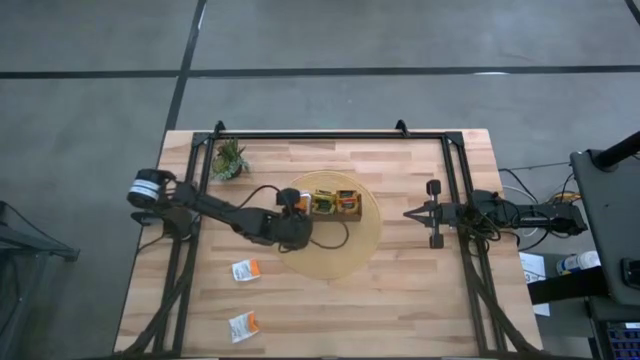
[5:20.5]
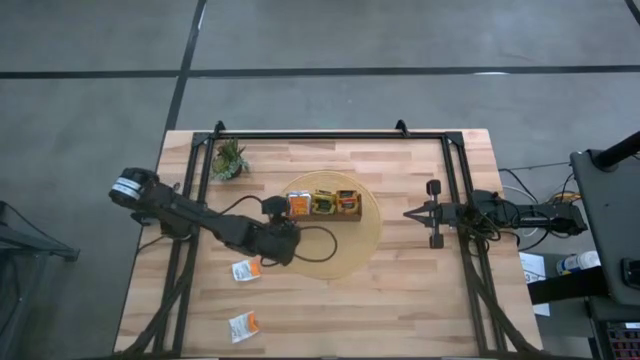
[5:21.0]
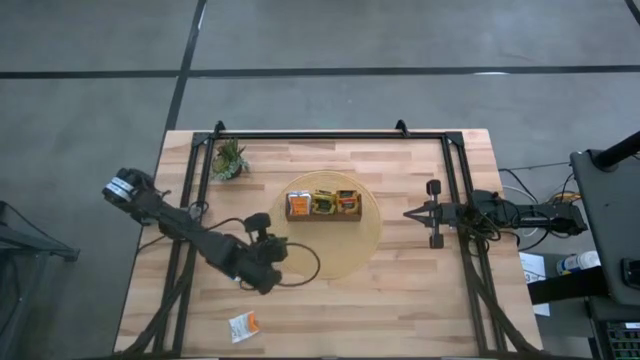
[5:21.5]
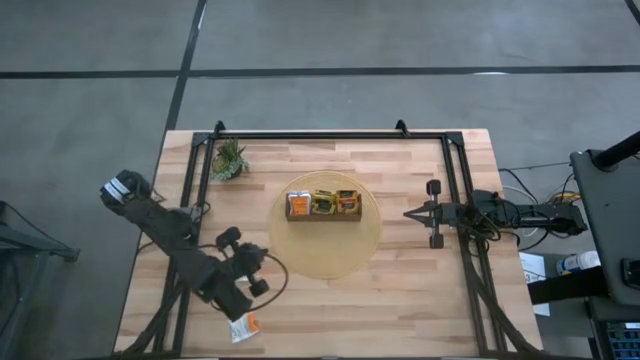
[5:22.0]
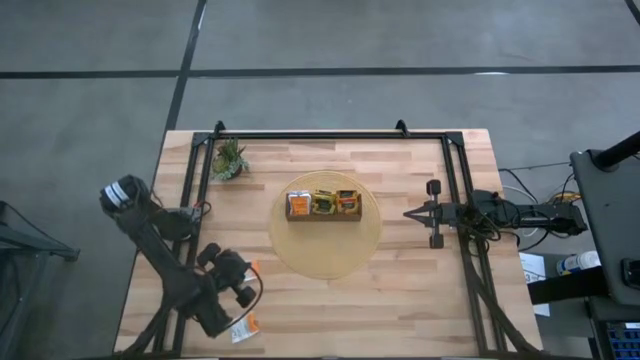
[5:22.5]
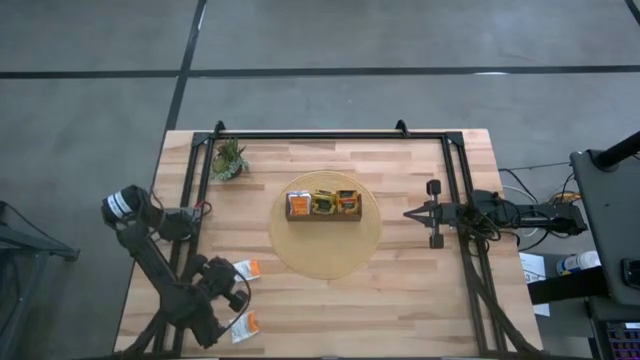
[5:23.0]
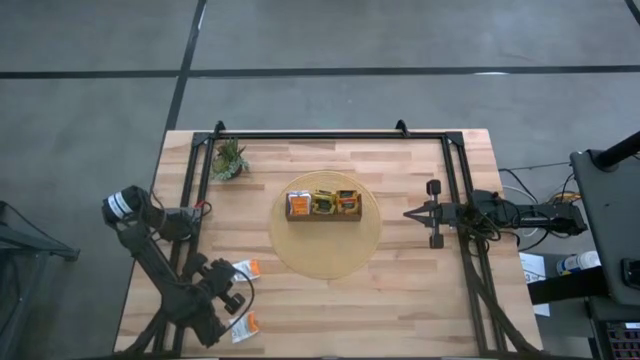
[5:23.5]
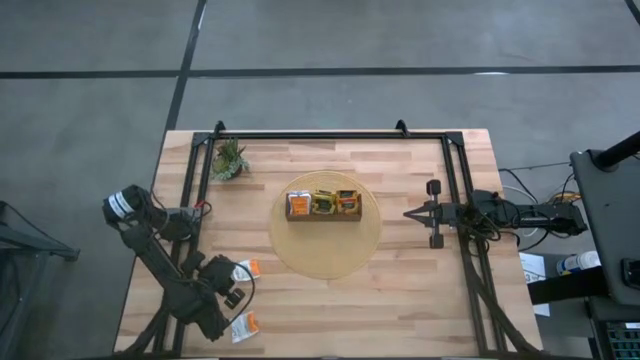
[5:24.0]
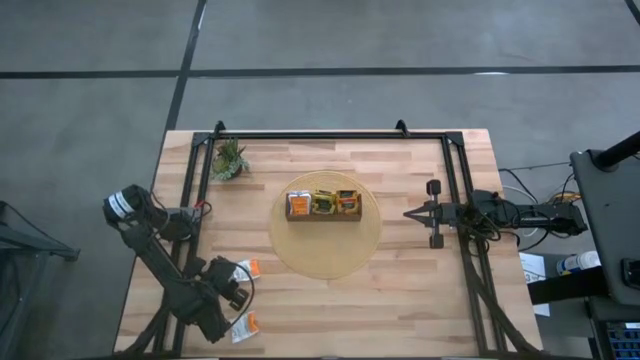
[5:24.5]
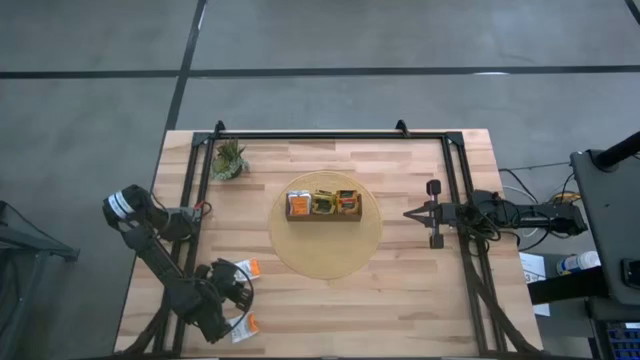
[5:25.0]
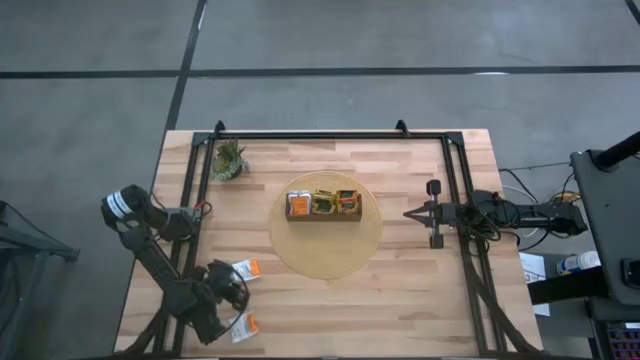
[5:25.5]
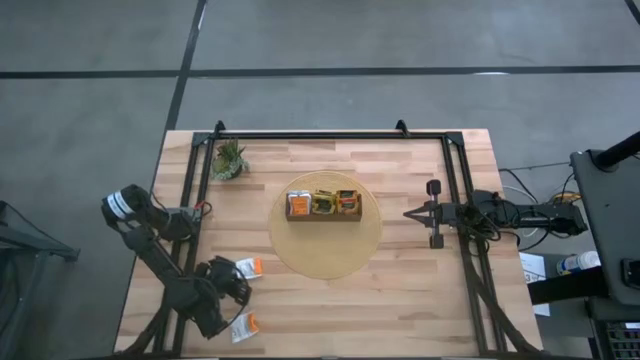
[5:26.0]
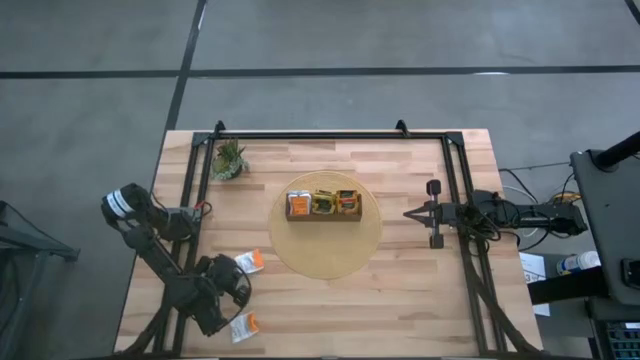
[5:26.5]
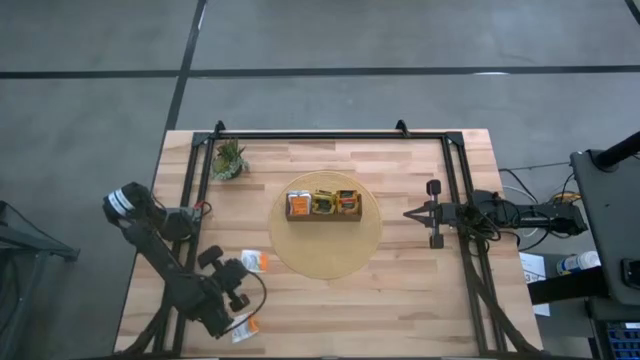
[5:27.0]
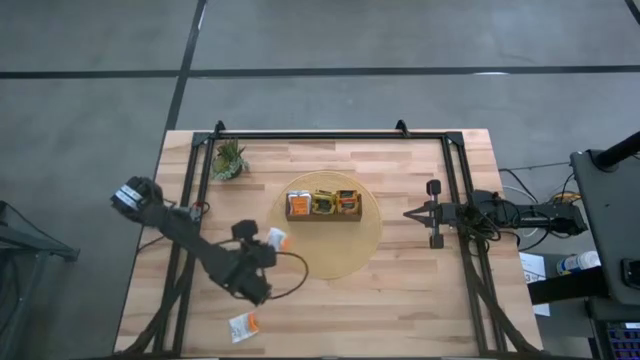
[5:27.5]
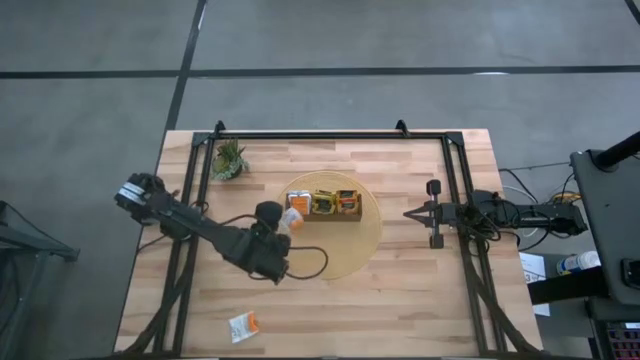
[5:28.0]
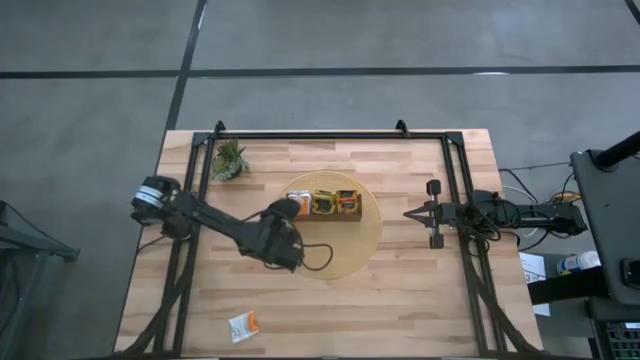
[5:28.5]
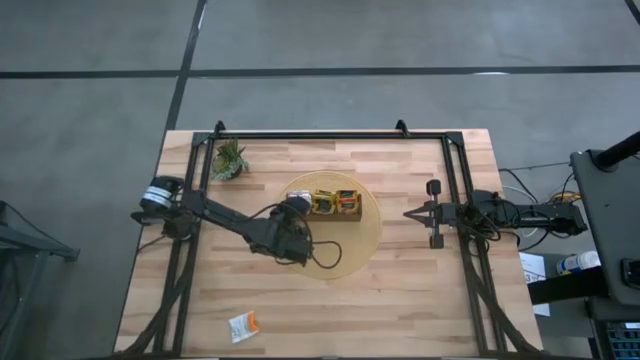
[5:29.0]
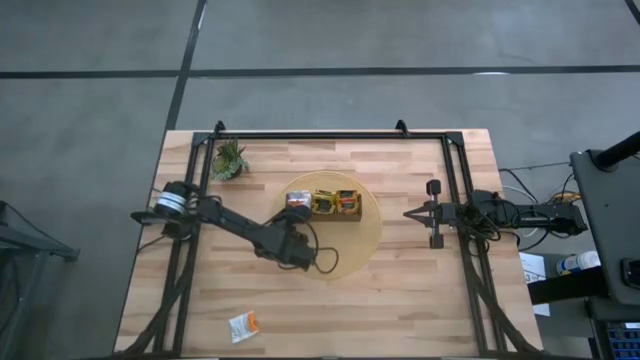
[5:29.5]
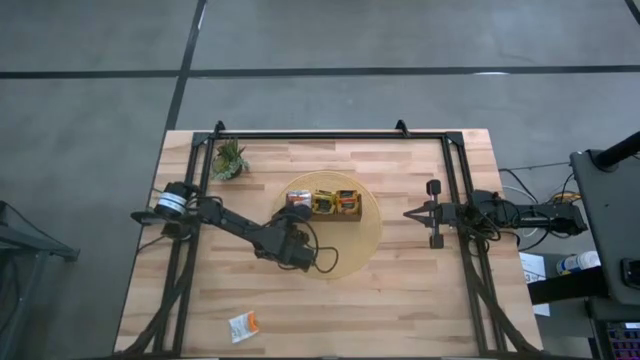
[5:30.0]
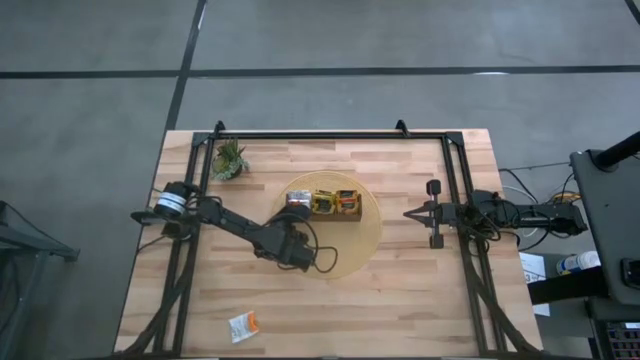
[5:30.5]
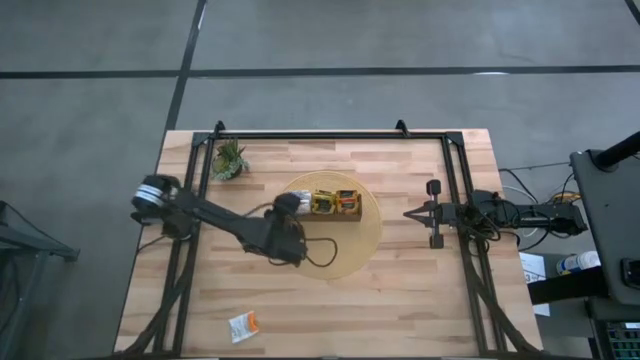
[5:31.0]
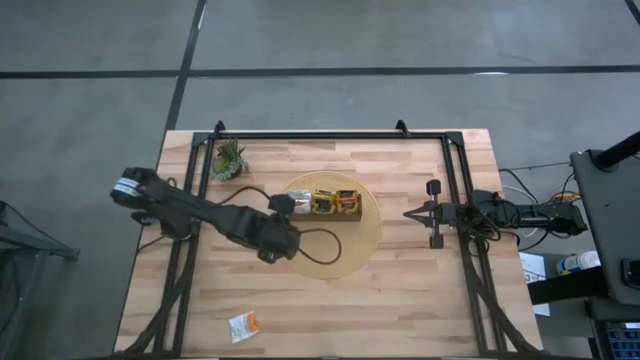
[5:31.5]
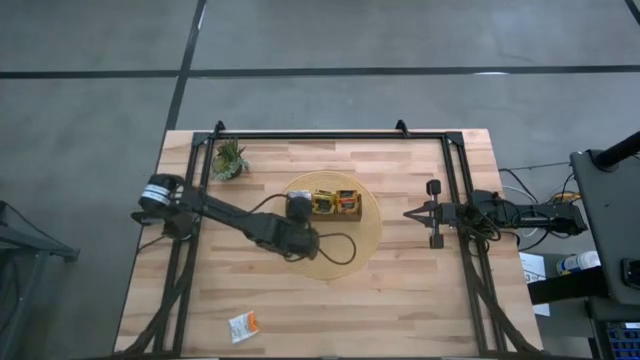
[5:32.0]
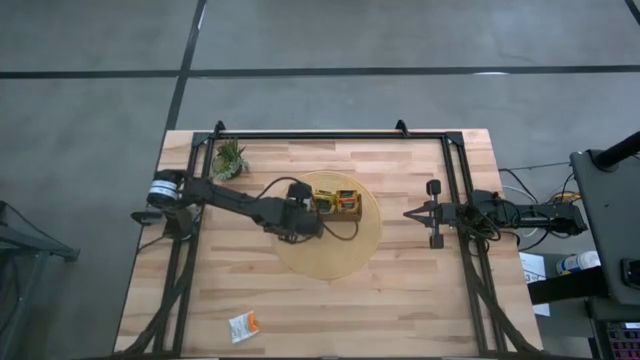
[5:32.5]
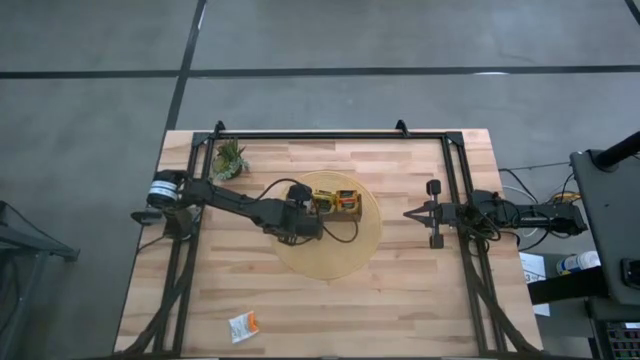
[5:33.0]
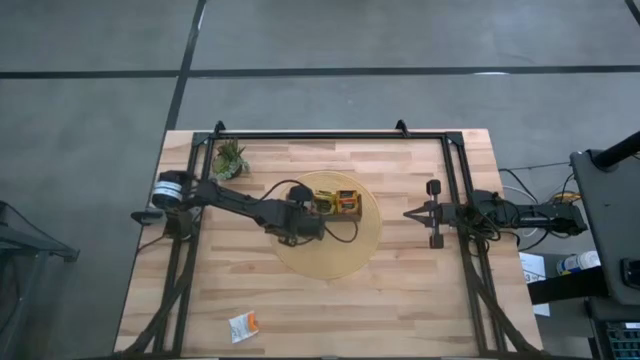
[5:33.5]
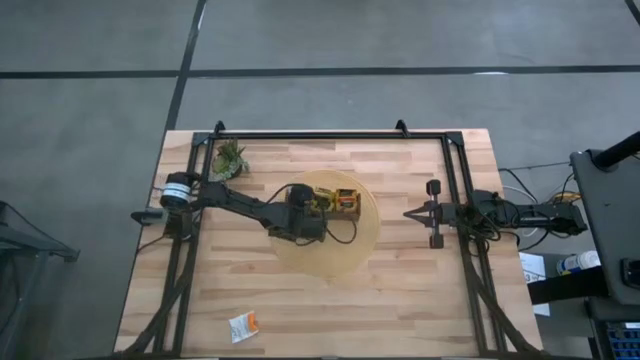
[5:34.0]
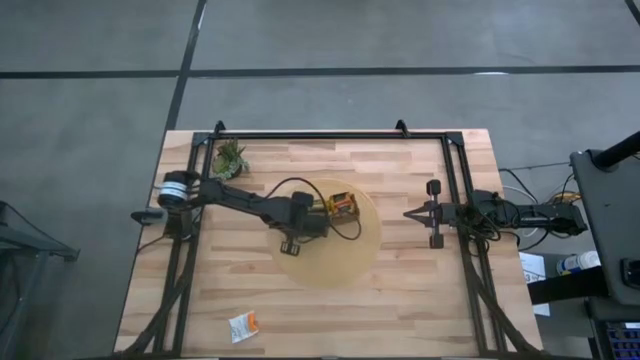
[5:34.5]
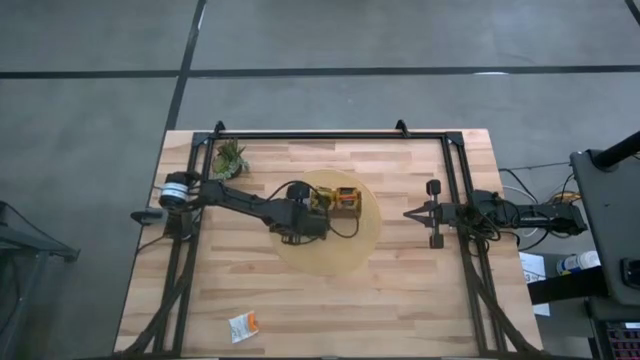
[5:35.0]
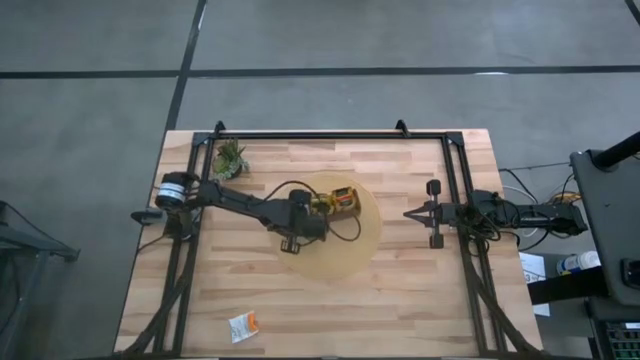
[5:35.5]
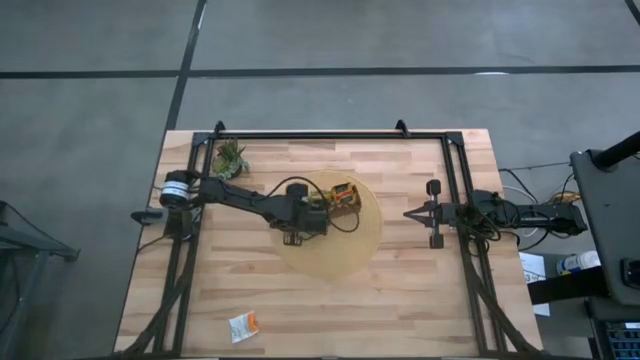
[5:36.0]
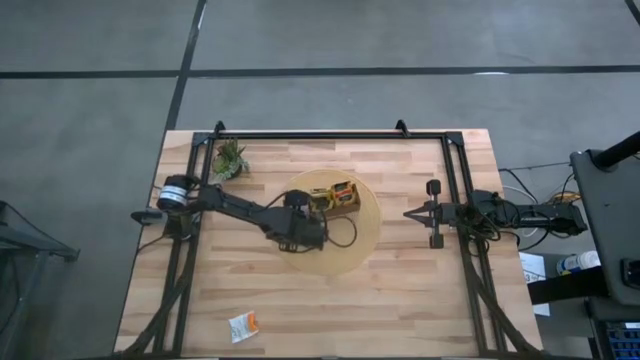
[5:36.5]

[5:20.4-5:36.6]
Task: Pick & Place Tea
Put the white tea bag into the left section of the wooden organizer

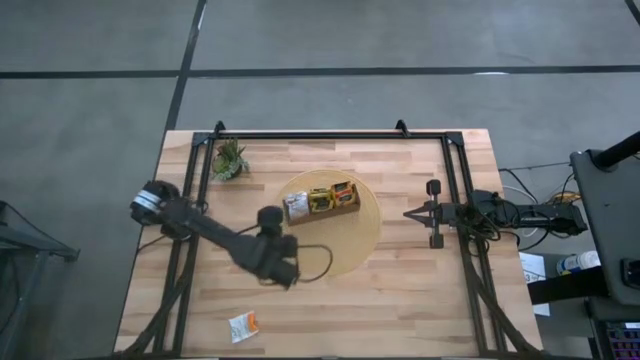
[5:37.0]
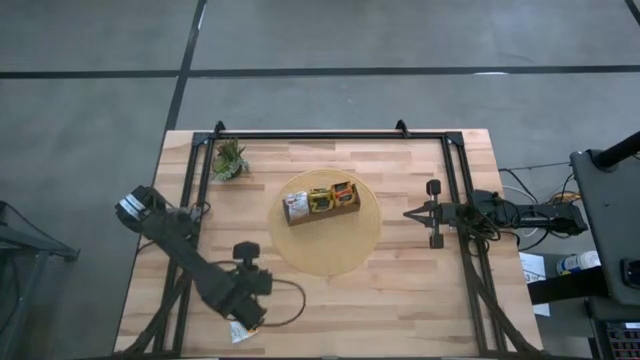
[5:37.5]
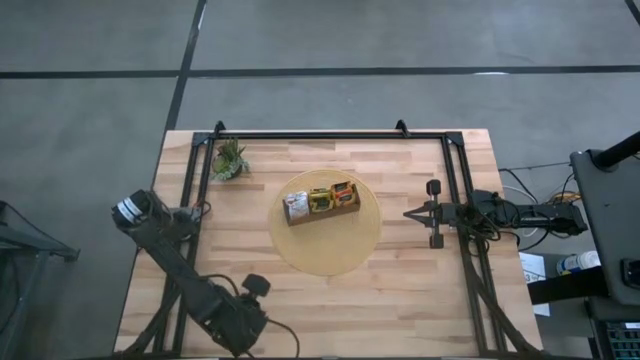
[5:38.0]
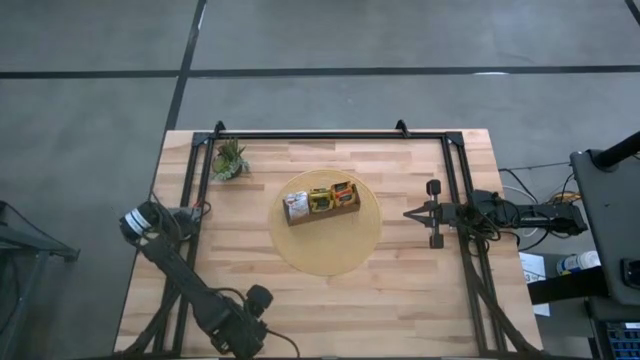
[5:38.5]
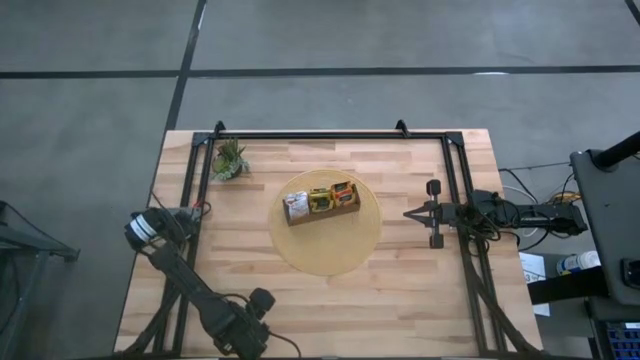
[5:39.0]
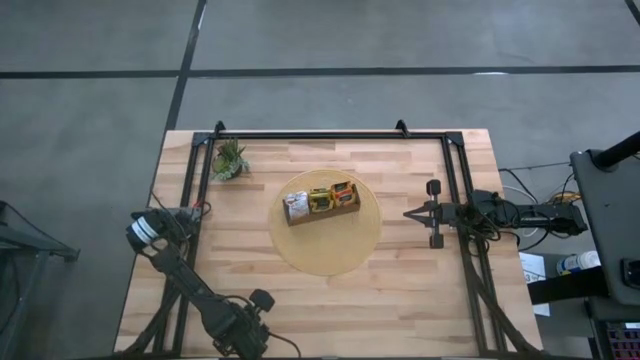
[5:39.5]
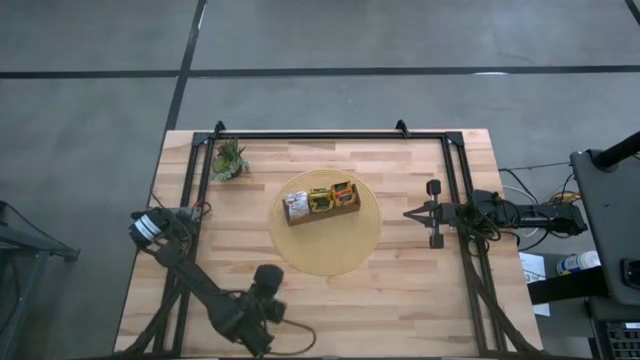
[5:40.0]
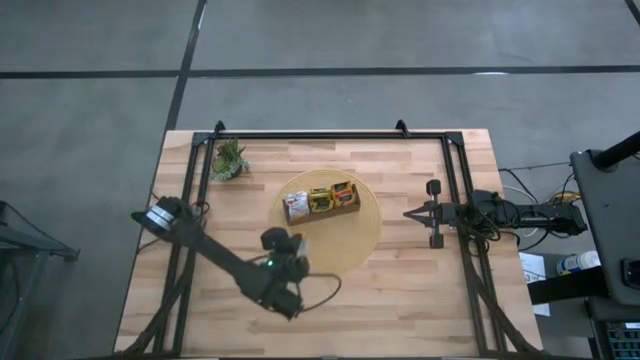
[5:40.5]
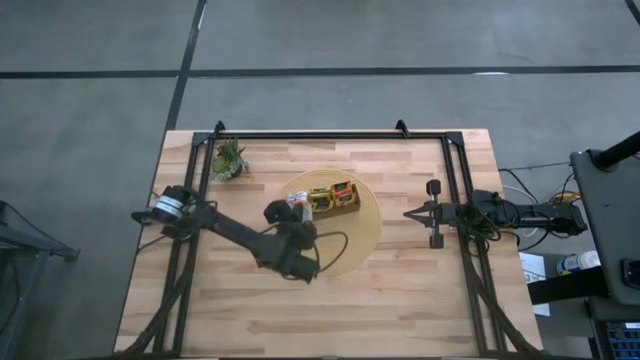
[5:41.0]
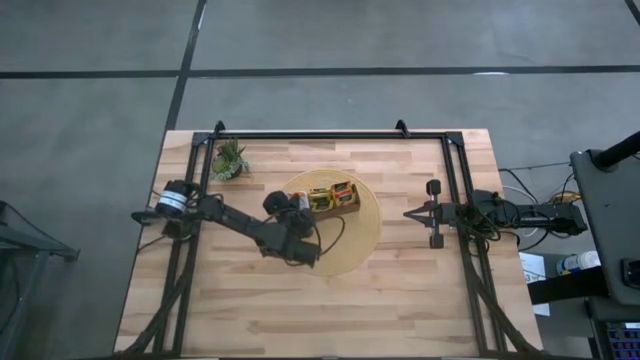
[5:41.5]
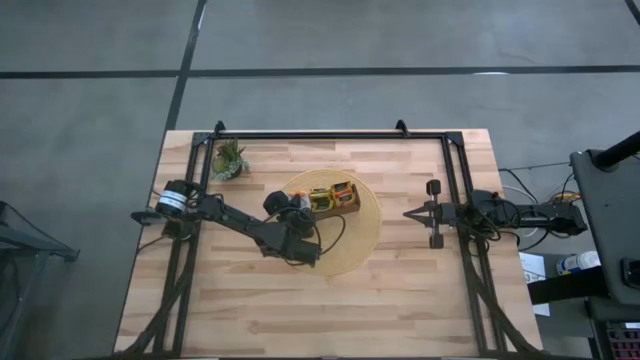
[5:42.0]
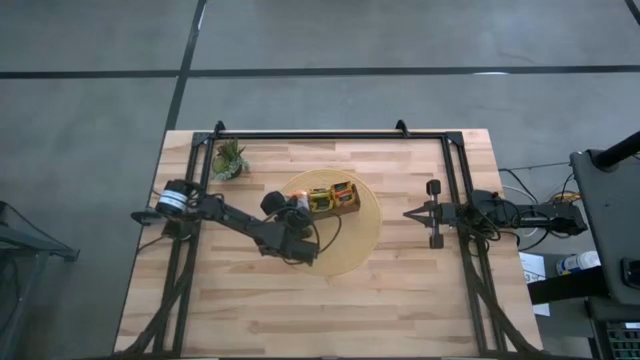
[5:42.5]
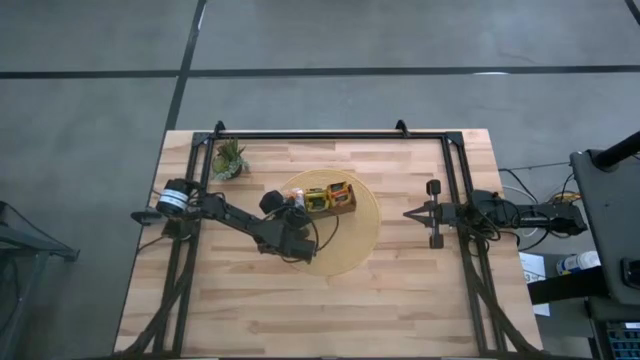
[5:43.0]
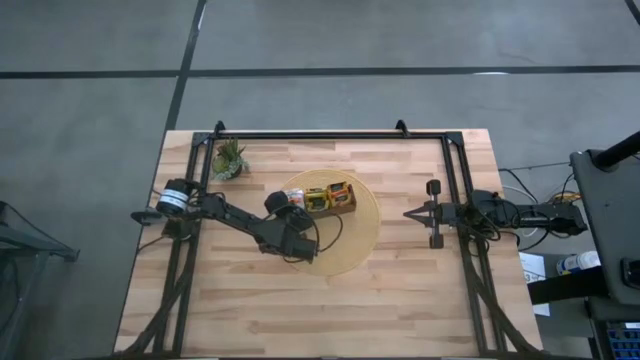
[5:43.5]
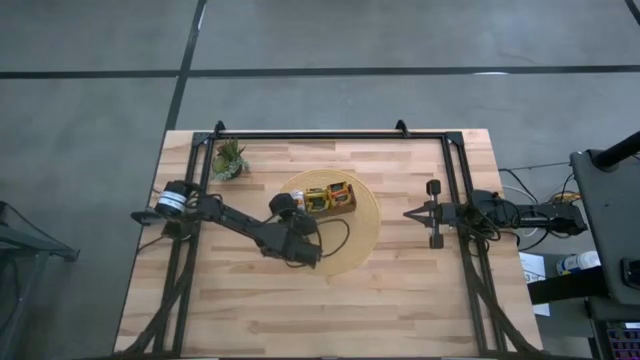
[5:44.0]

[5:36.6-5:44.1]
Put the white tea bag into the left section of the wooden organizer
